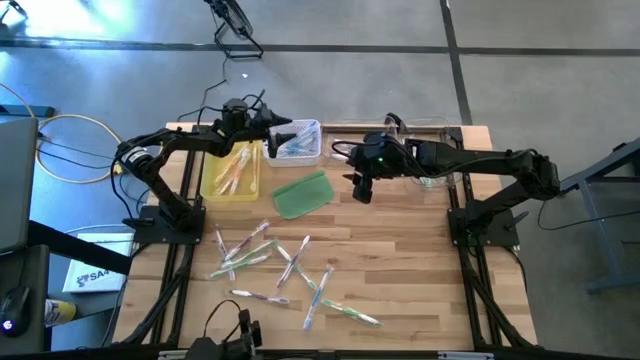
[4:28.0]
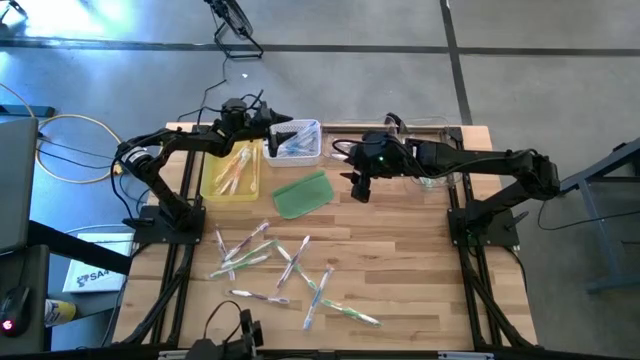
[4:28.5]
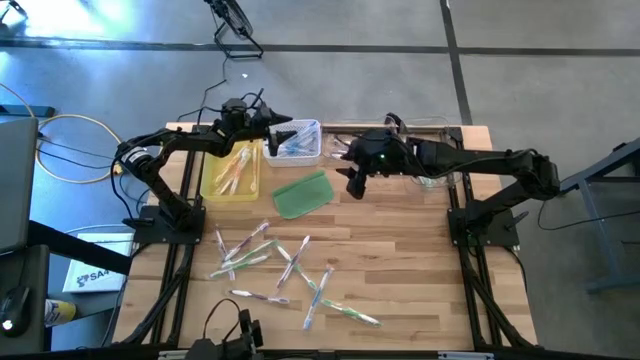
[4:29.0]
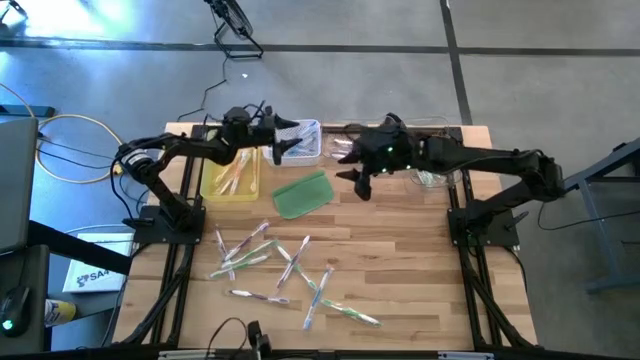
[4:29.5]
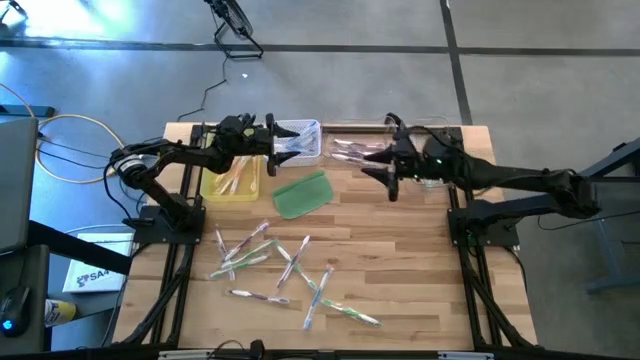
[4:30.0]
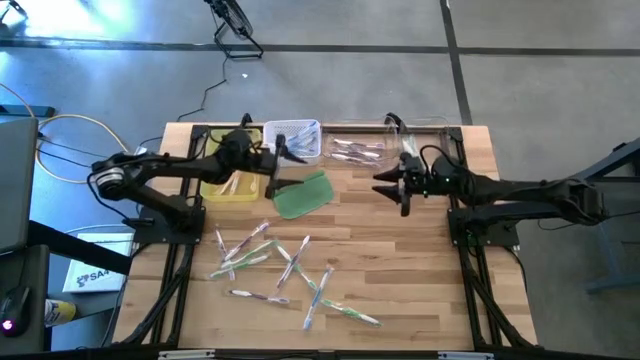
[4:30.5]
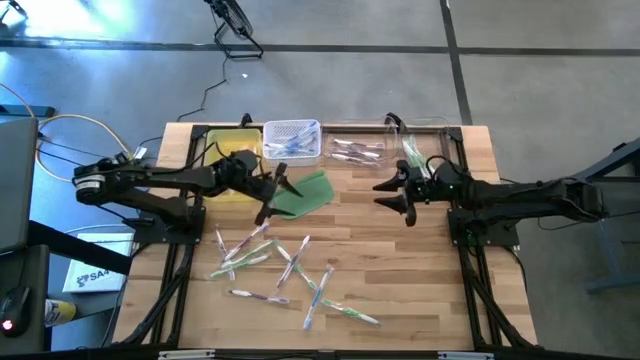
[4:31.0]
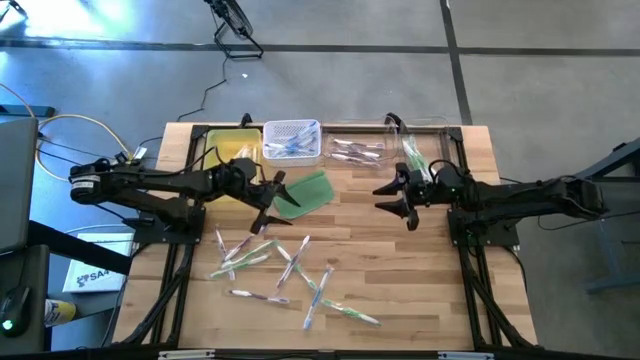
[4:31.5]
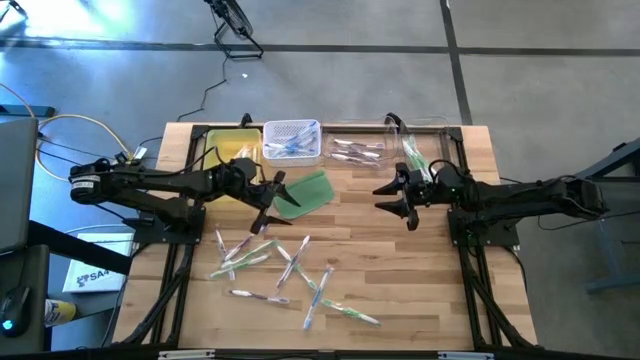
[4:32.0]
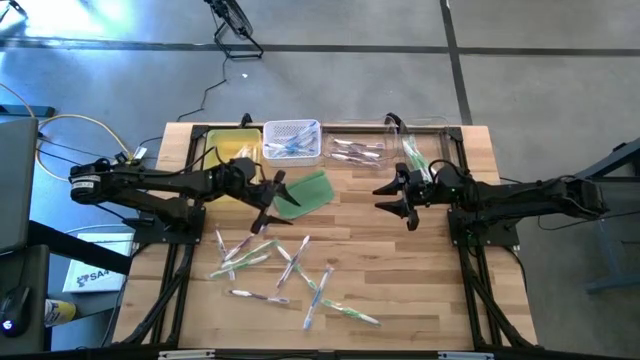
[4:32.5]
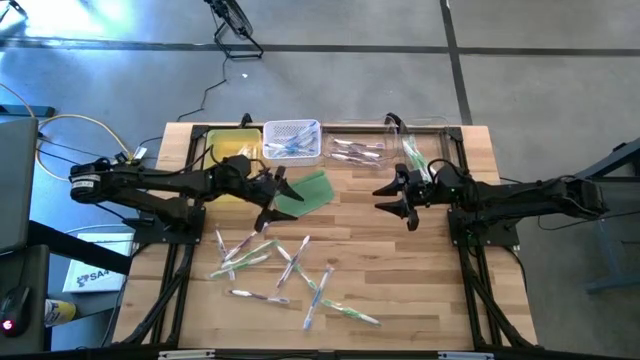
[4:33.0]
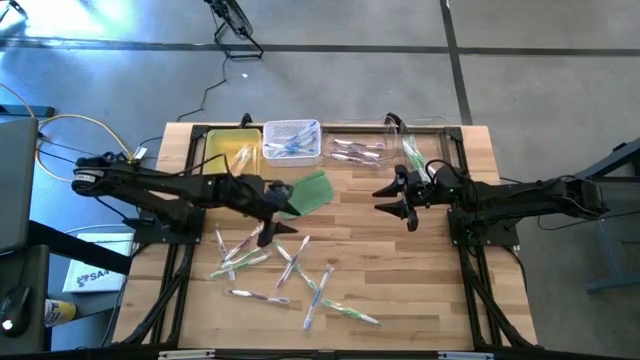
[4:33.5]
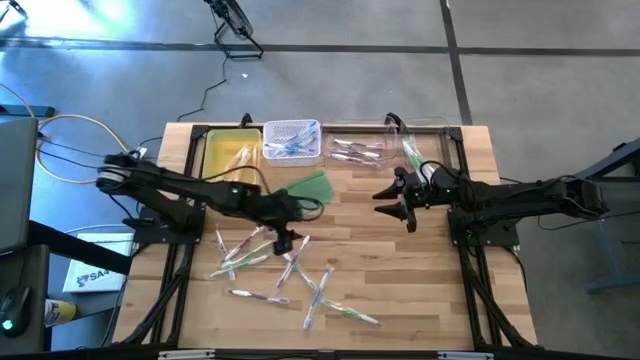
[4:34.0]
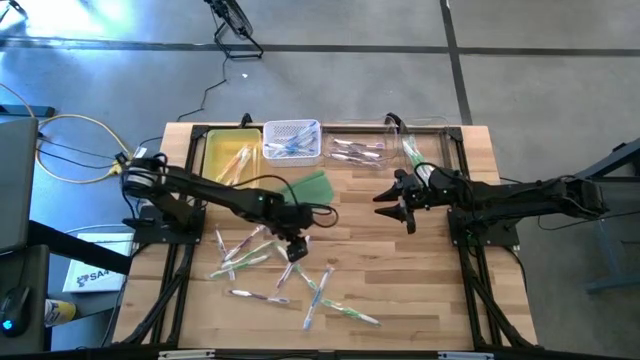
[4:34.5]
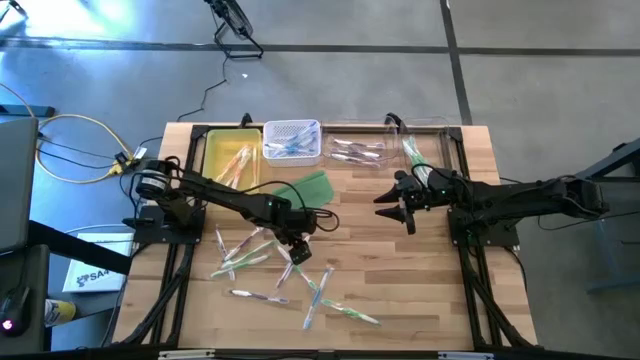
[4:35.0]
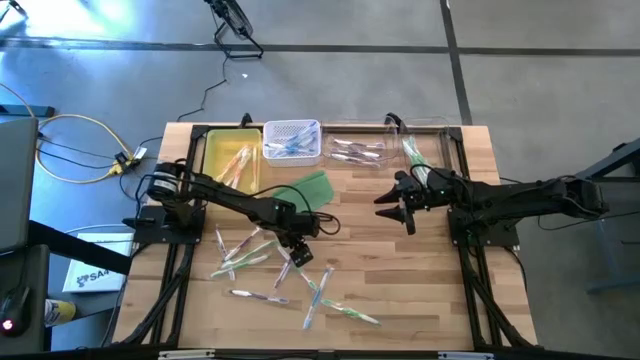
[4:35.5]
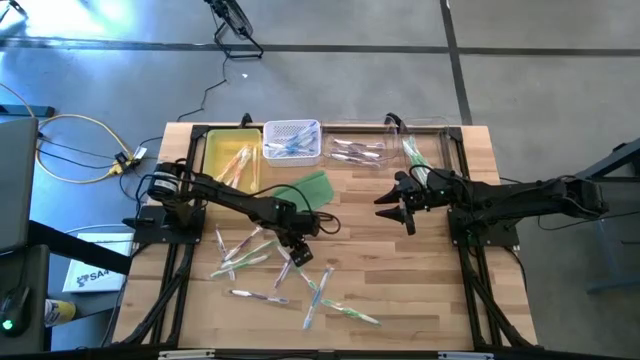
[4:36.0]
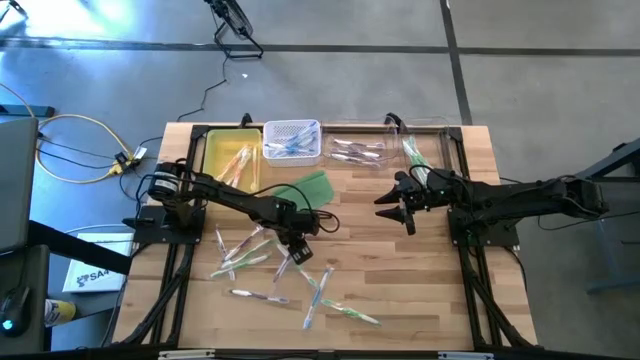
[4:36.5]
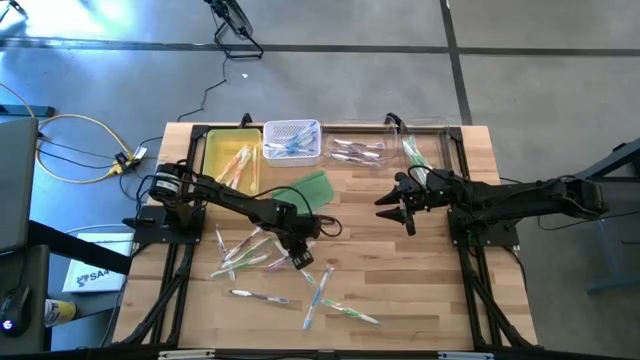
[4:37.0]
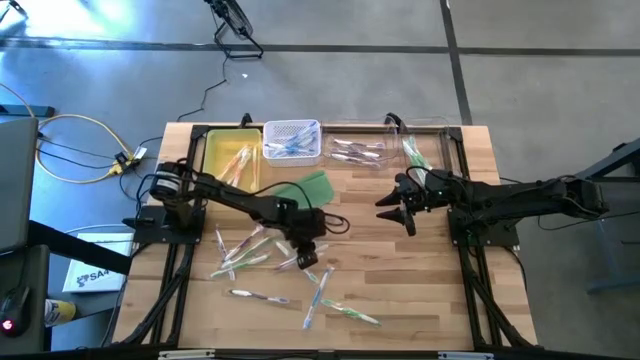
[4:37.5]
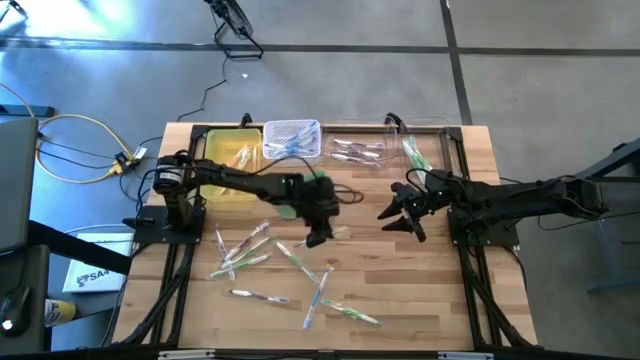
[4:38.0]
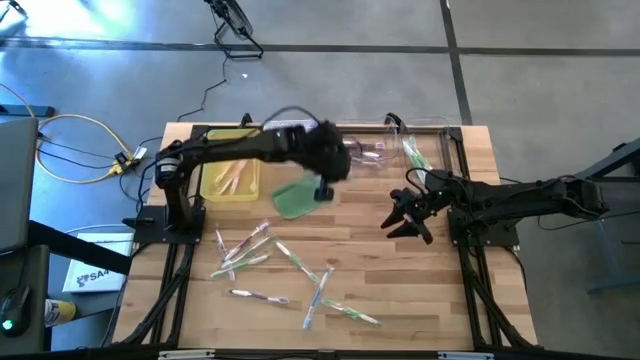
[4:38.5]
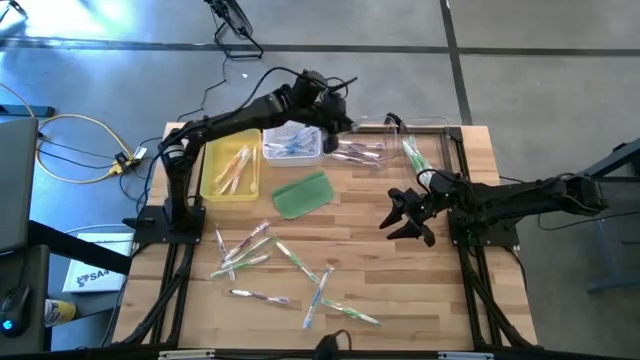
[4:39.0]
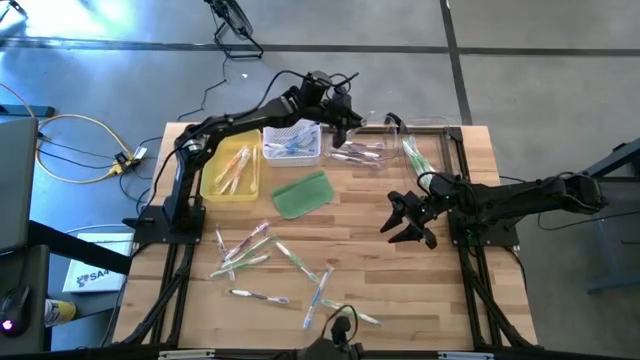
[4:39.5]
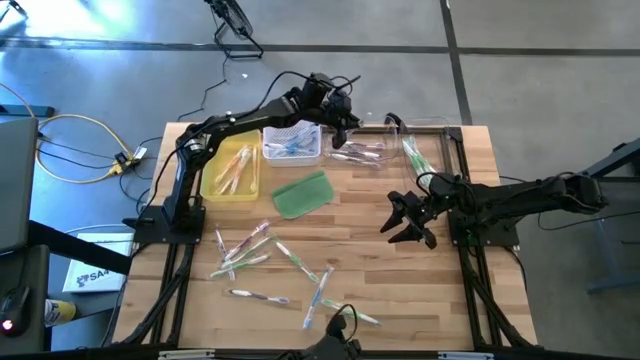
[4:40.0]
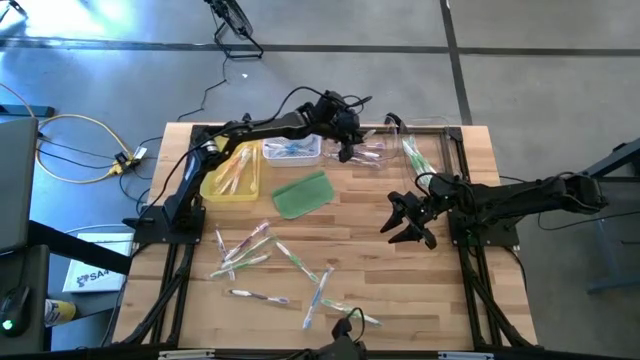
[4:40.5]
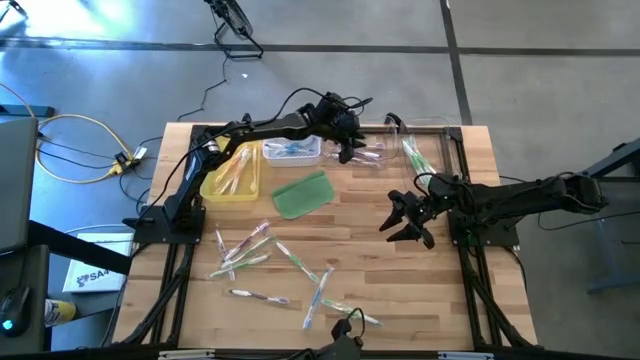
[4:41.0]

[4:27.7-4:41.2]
Task: Pick & Place Toothbrushes
Put the violet toothbrush into the left transparent bin

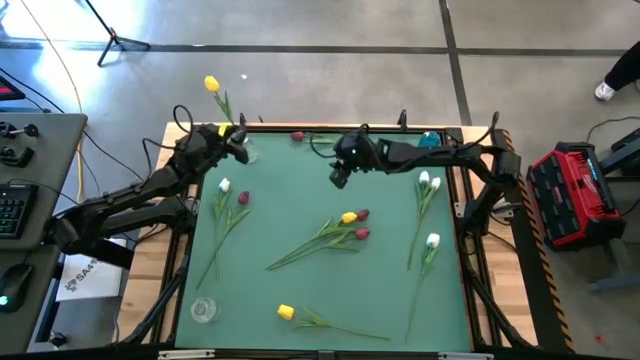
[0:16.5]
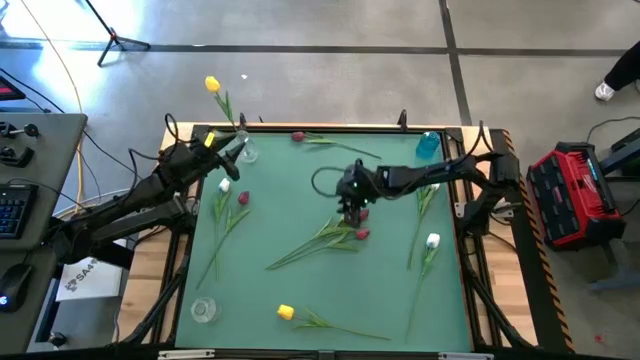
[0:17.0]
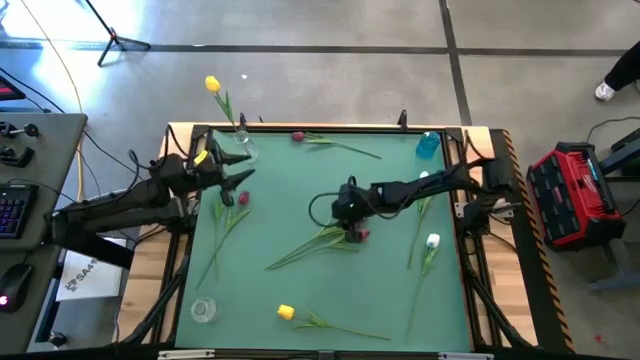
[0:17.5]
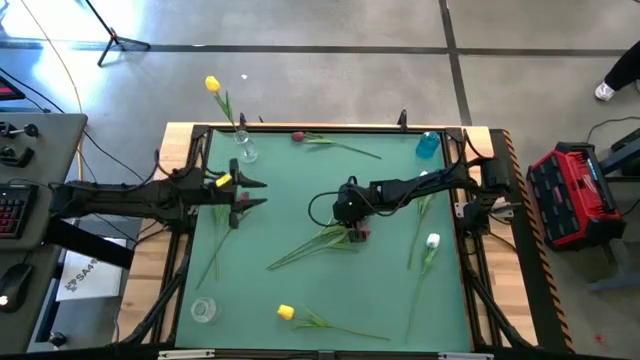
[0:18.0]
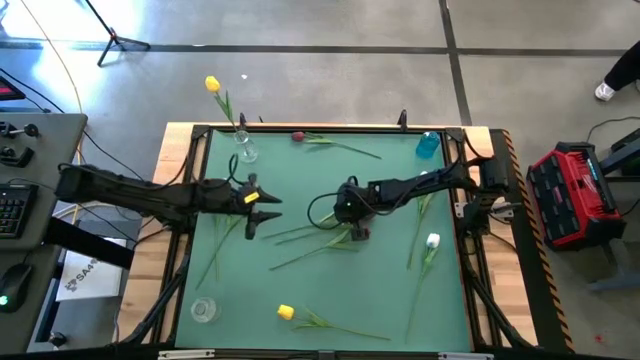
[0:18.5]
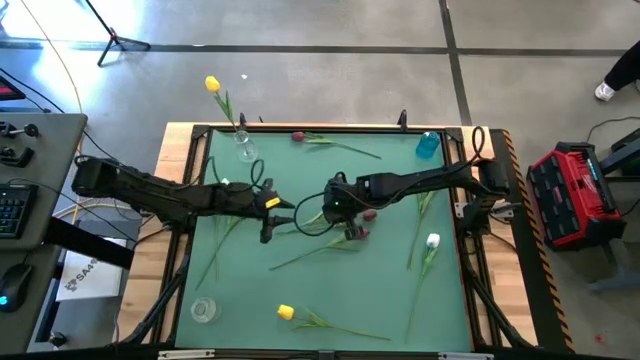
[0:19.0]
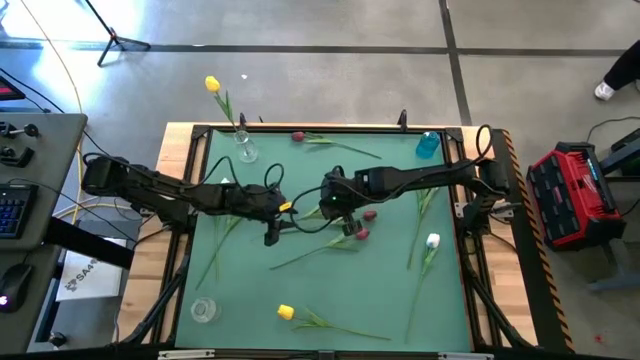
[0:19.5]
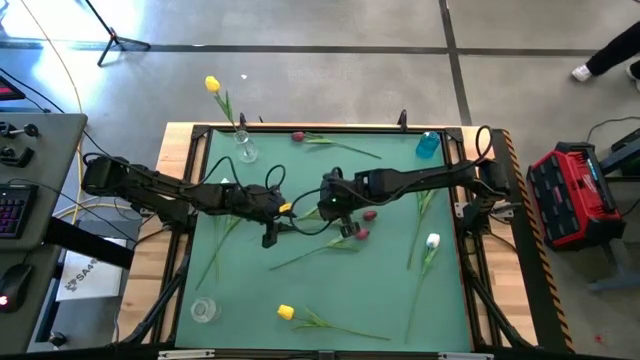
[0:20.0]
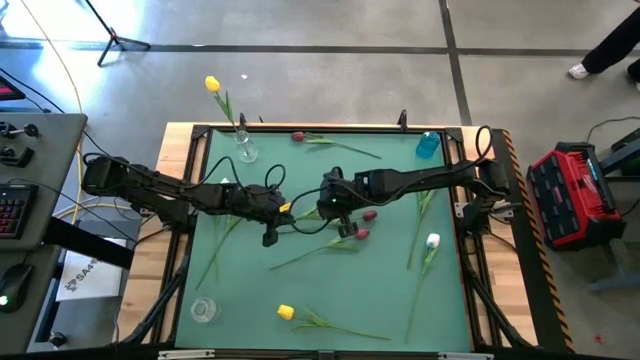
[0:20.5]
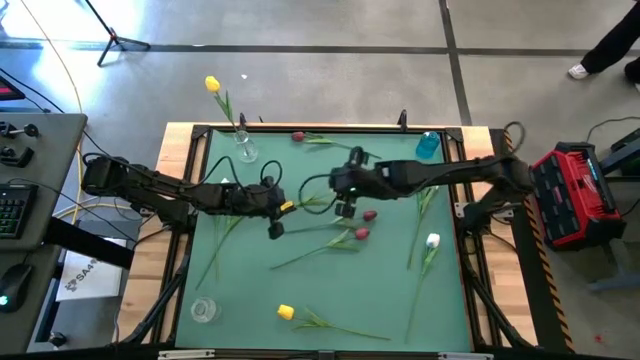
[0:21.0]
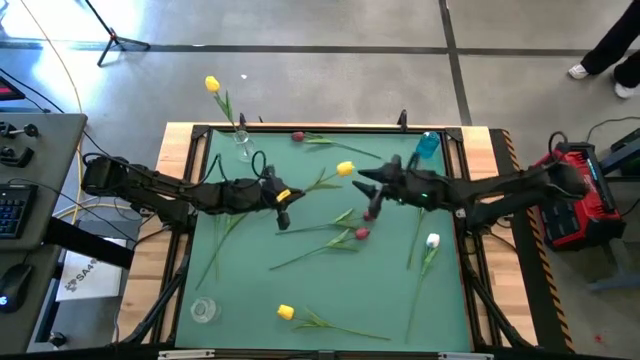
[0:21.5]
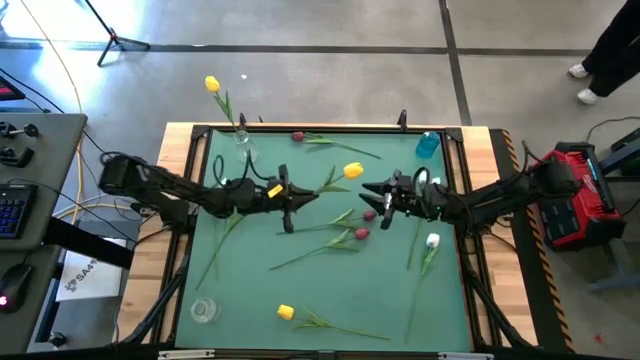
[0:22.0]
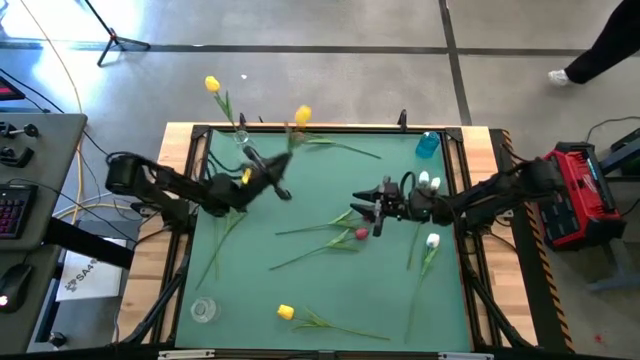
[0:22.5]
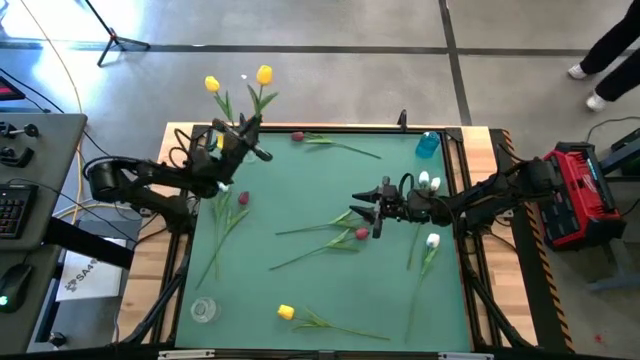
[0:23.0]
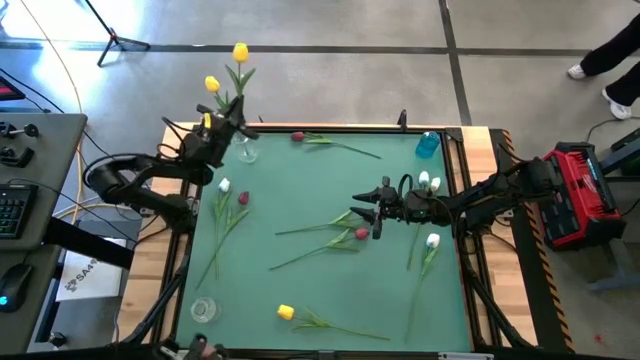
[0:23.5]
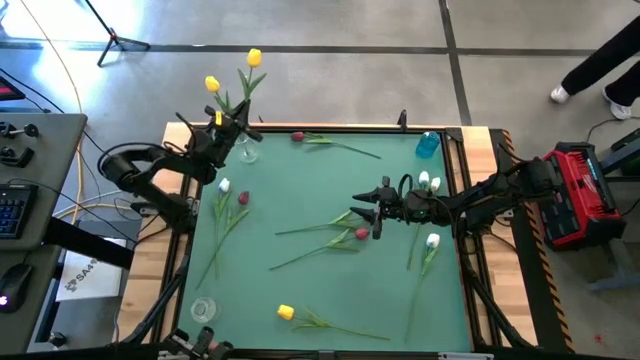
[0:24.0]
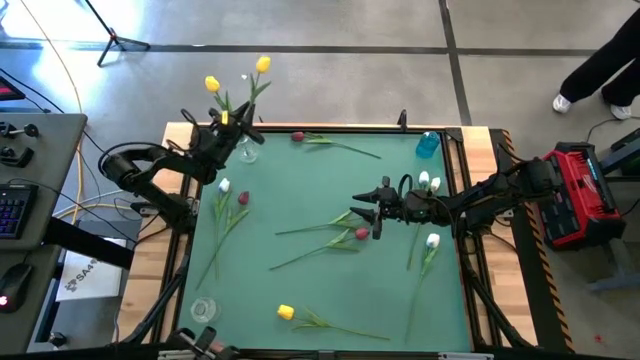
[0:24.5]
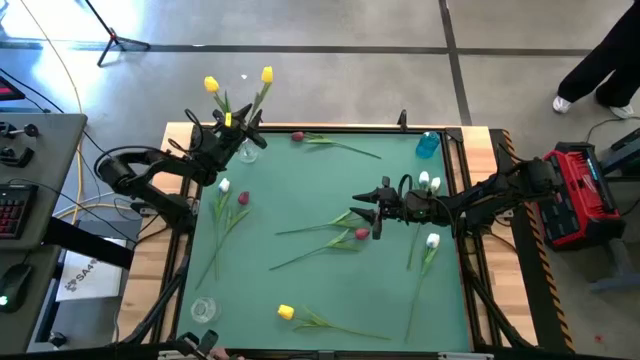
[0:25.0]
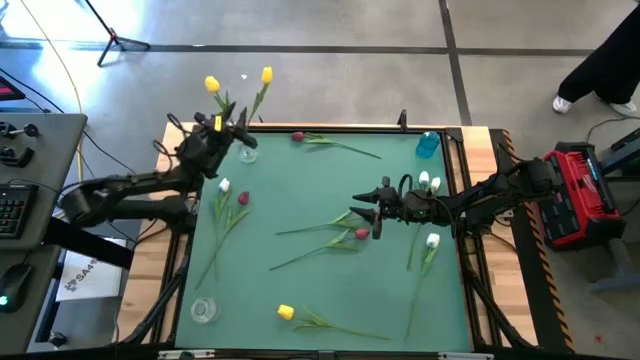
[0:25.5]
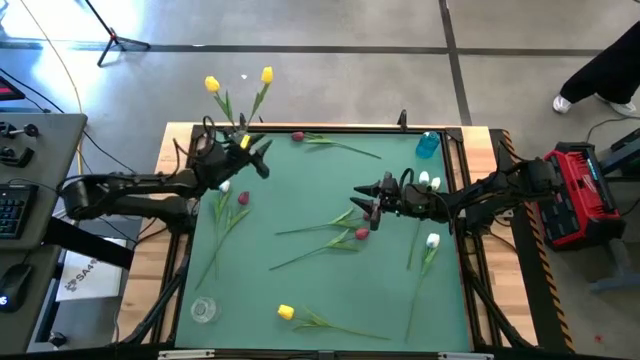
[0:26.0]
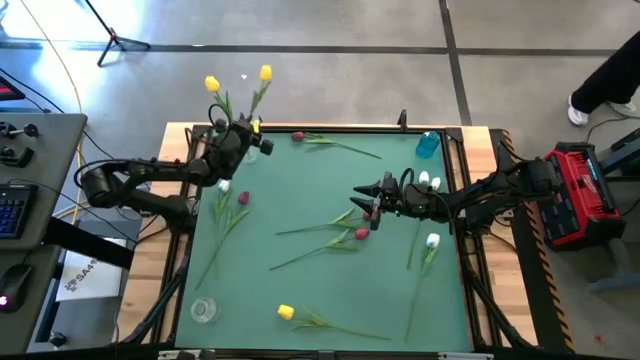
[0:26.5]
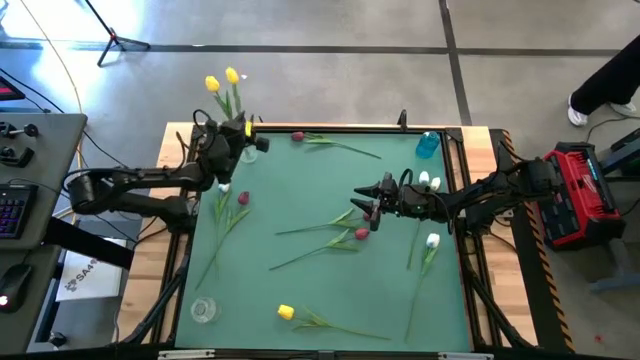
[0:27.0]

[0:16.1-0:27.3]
Task: Sort flowers into vase by color
Put the top yellow tulip into the top transparent vase
